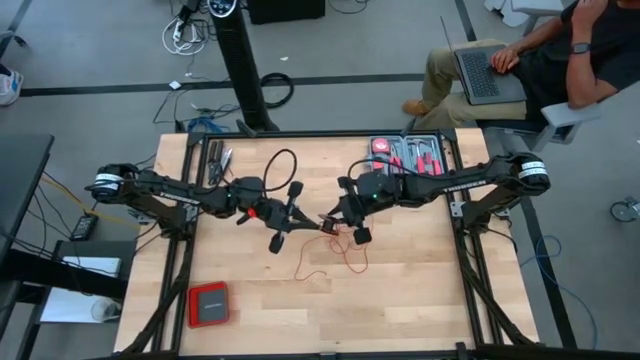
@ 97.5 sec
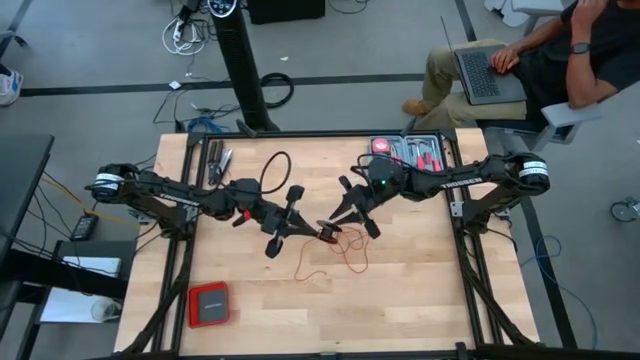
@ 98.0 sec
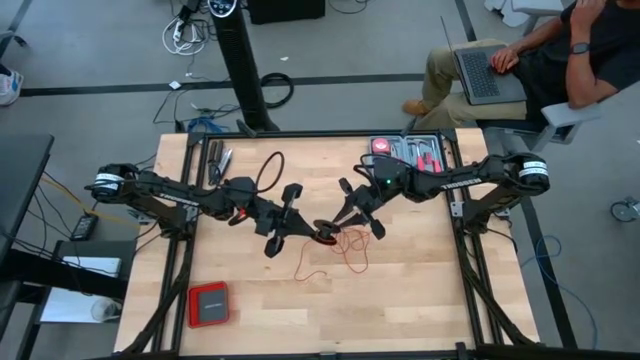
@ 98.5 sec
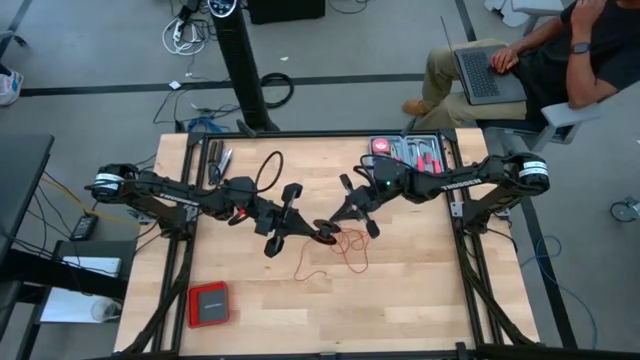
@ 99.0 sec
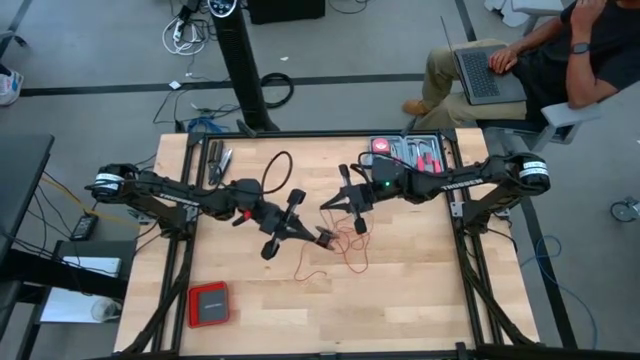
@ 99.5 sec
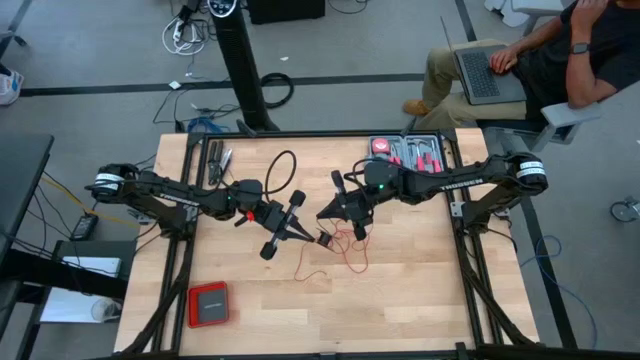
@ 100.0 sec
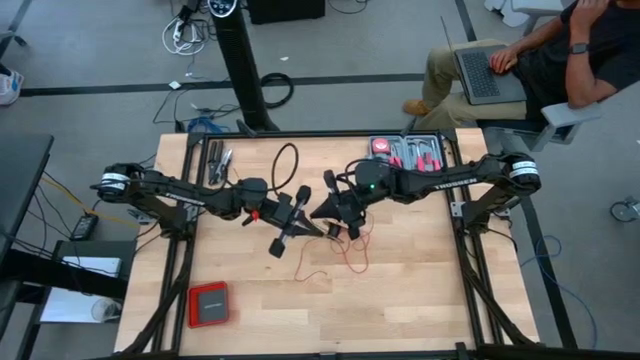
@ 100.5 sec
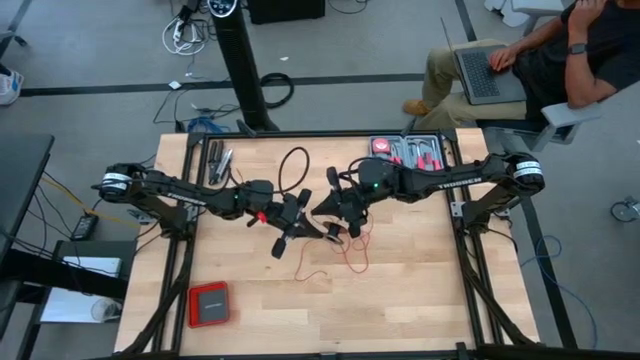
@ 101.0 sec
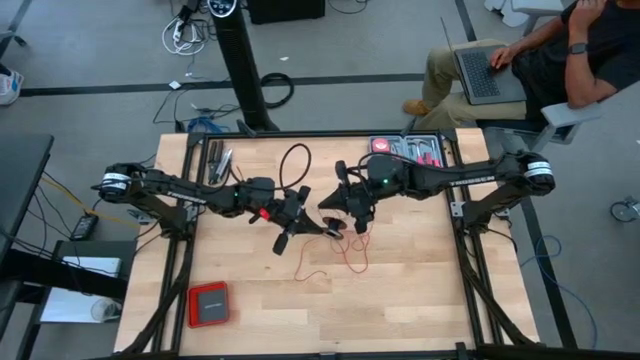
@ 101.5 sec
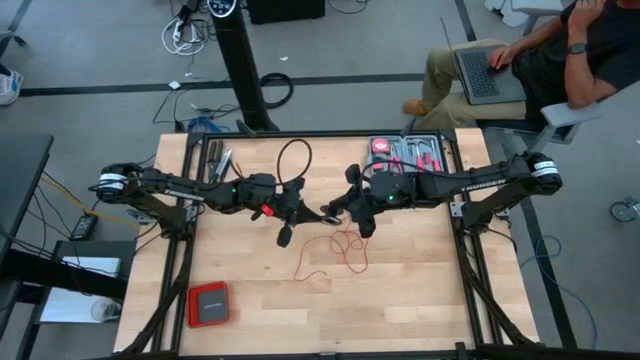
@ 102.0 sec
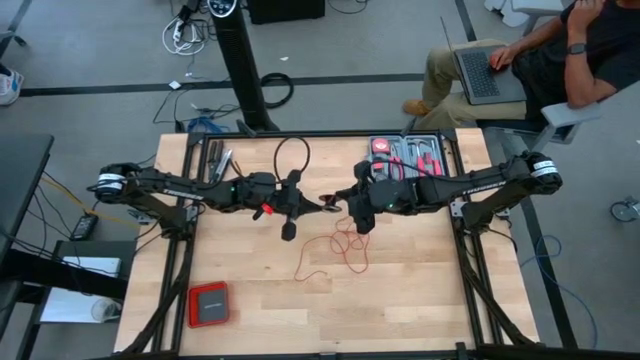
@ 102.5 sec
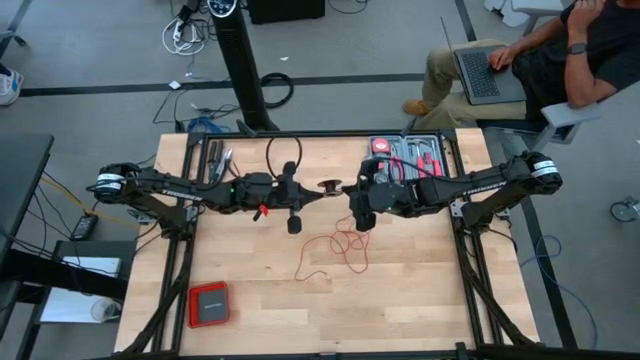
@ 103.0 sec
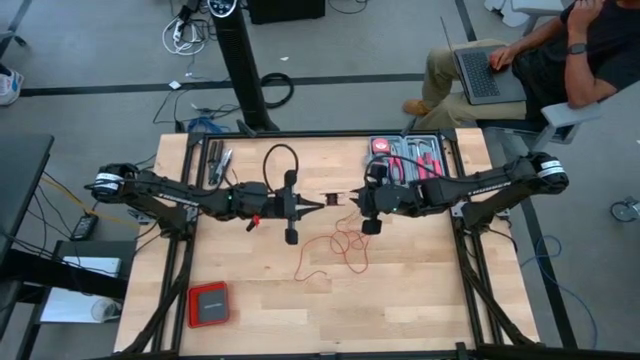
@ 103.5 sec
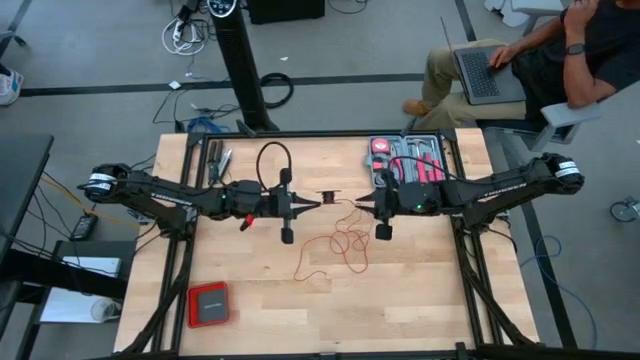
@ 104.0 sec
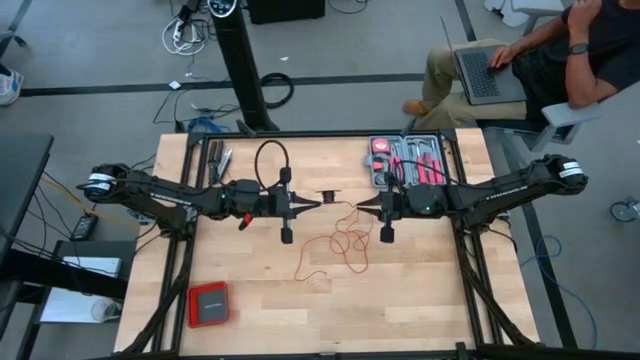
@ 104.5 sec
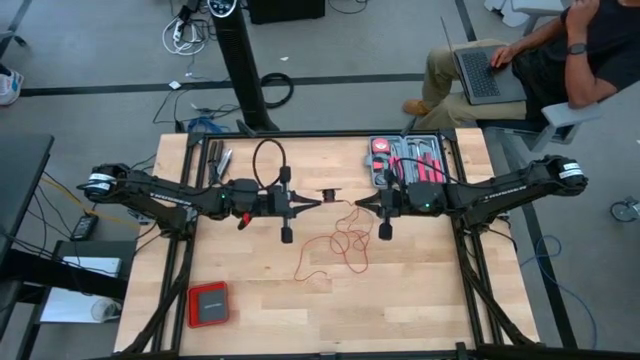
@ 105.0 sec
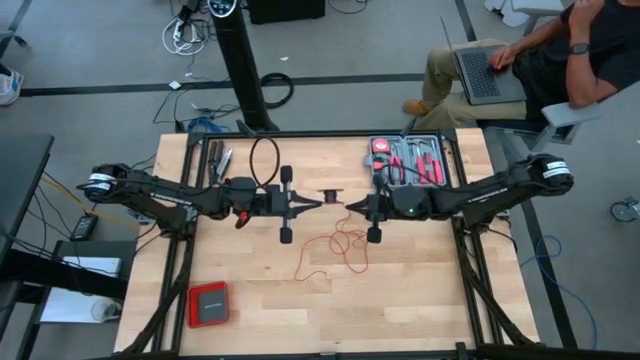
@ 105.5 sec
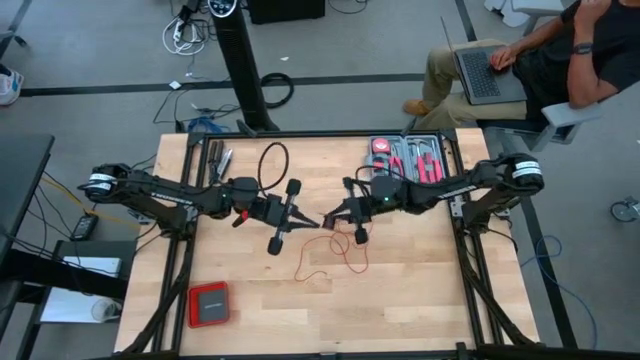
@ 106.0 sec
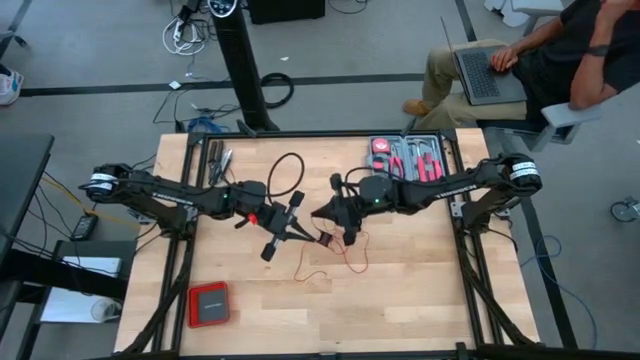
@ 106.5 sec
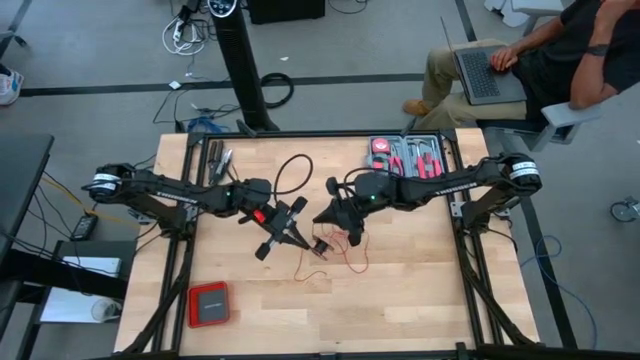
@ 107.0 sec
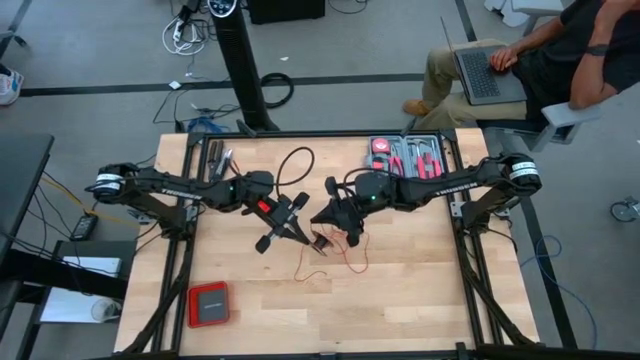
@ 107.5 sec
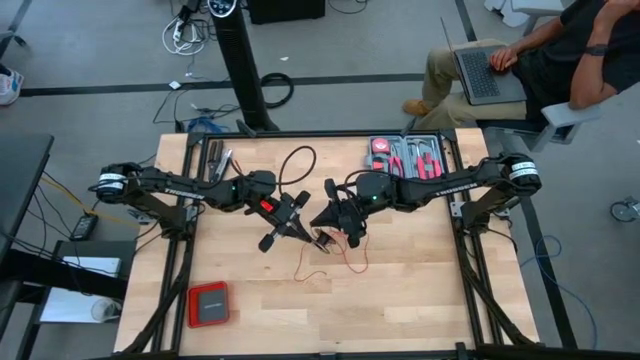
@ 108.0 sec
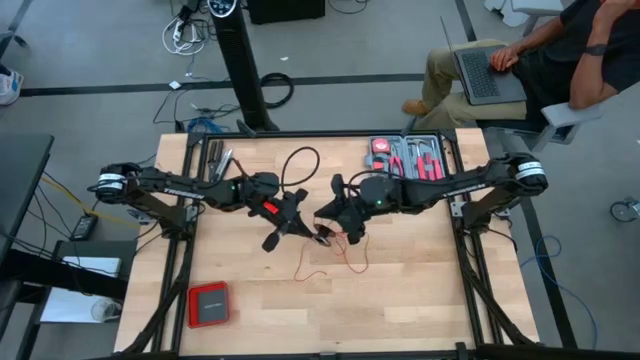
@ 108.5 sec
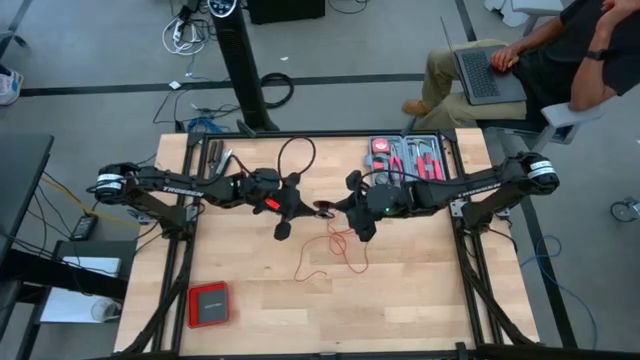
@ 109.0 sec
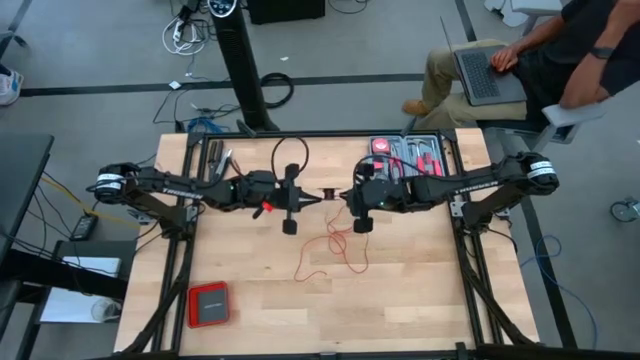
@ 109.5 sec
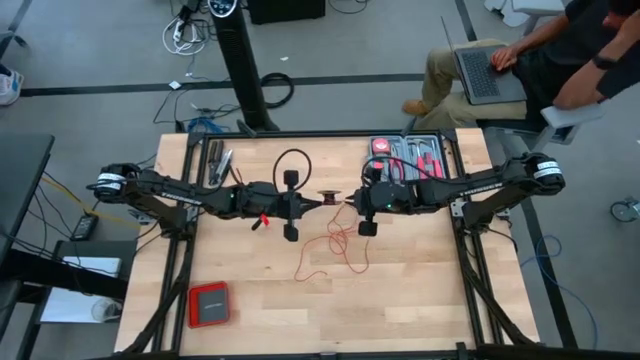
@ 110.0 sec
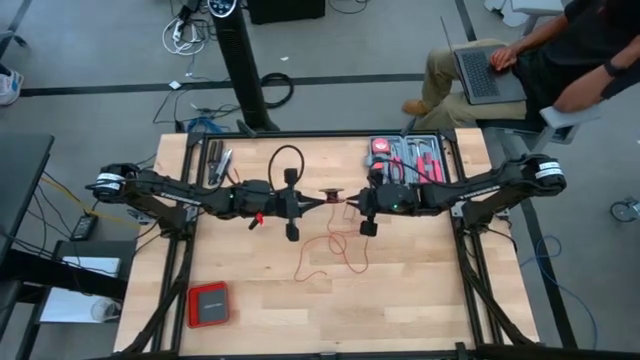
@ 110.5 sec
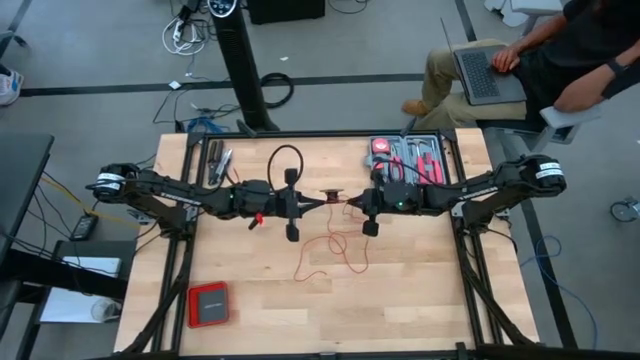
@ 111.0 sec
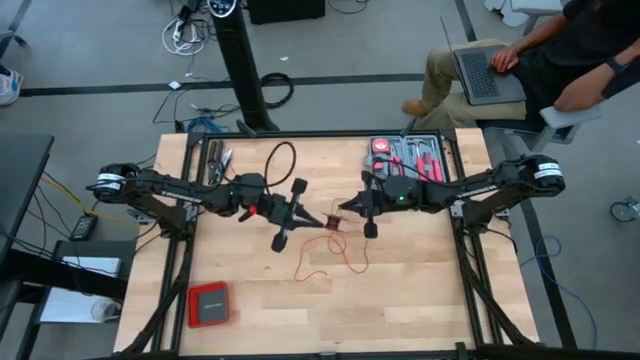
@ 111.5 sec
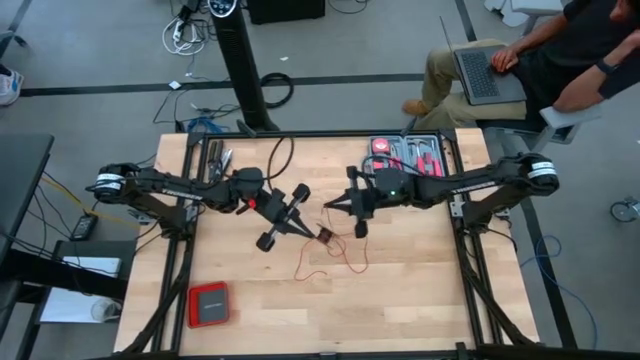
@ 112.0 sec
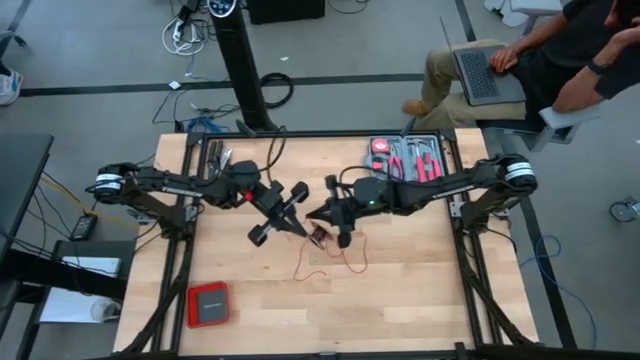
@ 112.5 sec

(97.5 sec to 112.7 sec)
Task: Coil cords
Coil the red cable wire onto the black spool

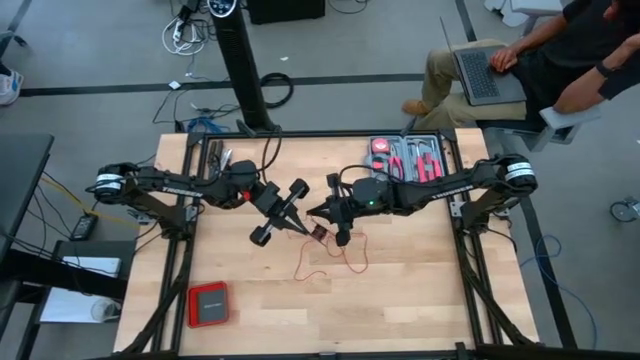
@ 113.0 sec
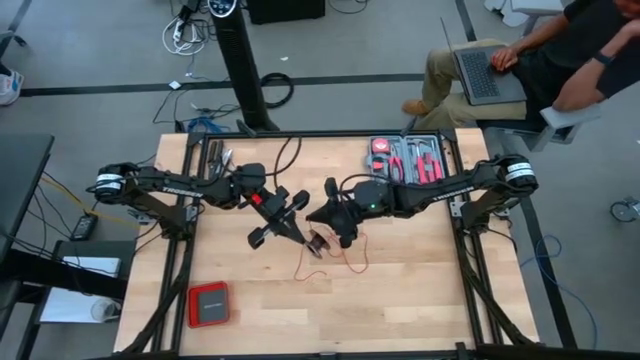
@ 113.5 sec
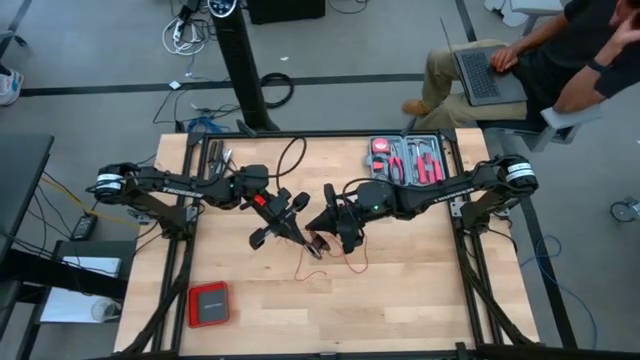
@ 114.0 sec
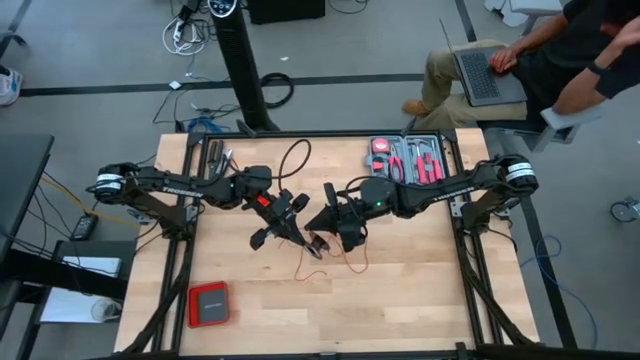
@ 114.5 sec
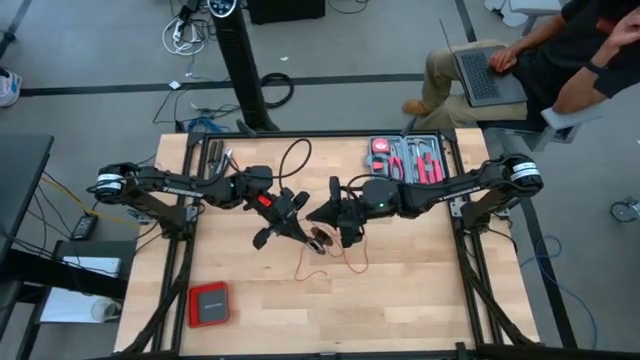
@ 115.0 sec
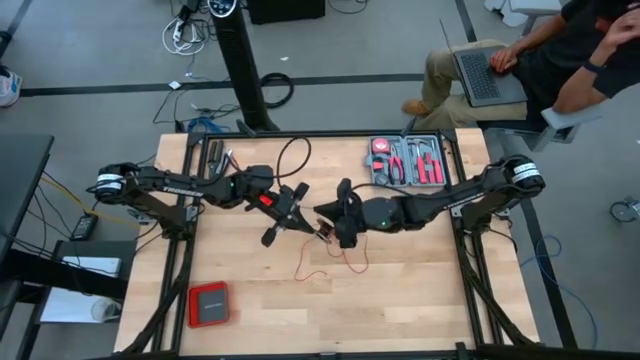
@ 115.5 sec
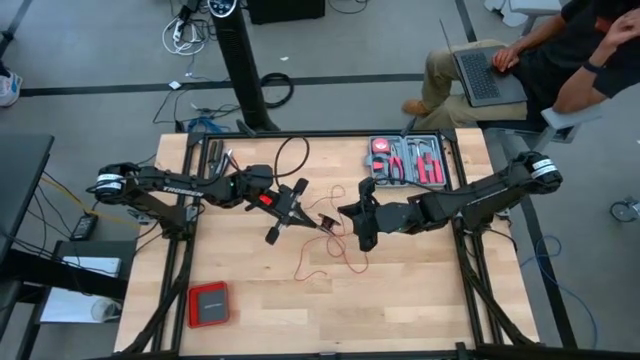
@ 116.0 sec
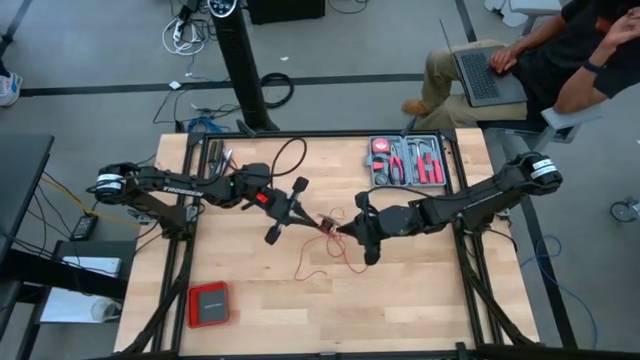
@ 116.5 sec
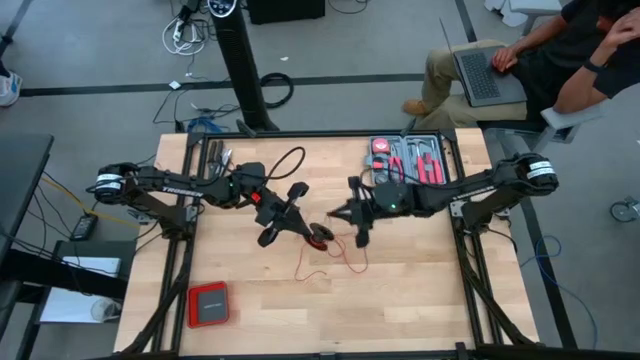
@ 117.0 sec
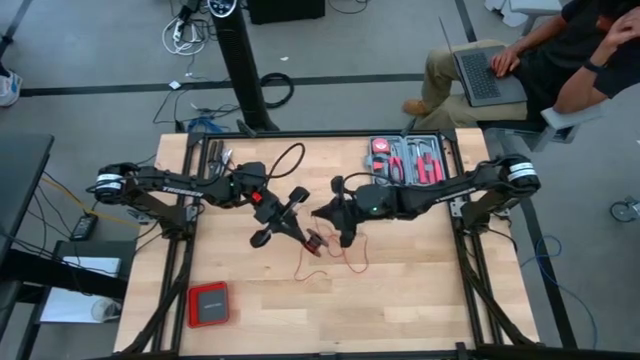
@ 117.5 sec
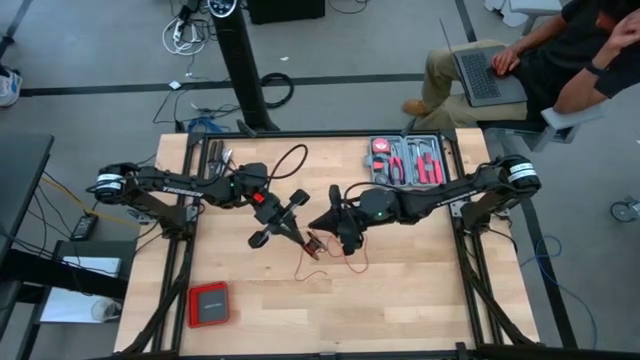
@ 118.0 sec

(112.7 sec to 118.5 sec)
Coil the red cable wire onto the black spool

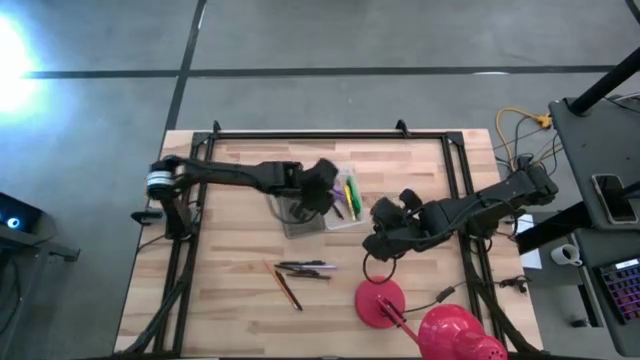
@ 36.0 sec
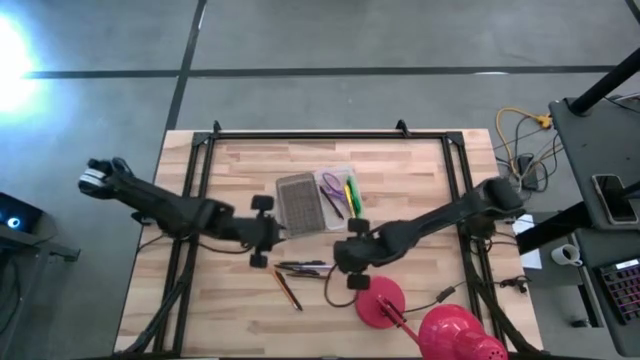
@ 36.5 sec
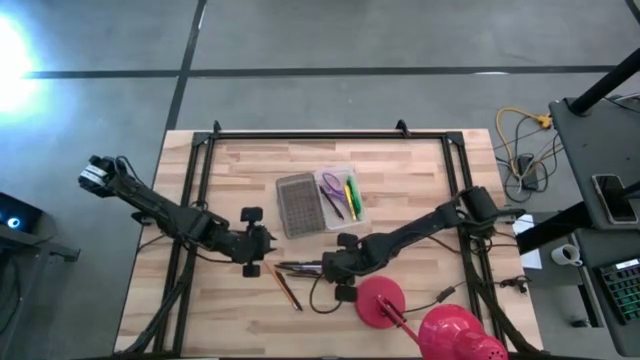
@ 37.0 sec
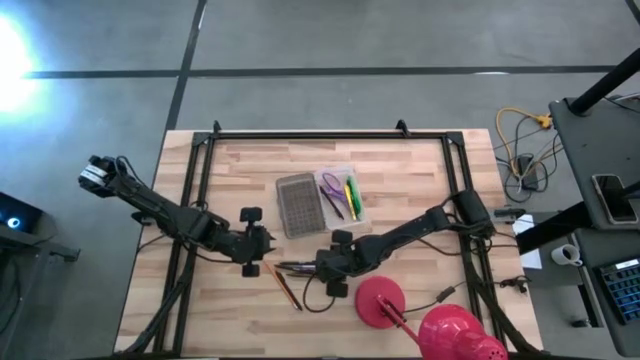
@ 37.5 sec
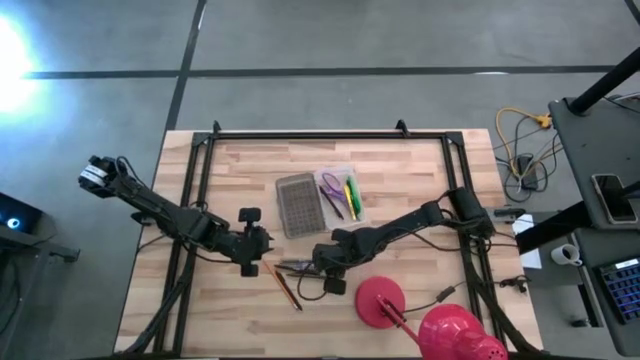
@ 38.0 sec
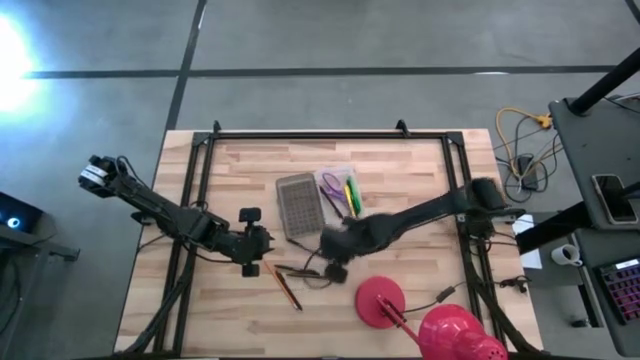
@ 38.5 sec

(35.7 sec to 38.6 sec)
Task: Pick & place school supplies into a supply box
Put the purple pen into the black supply box
